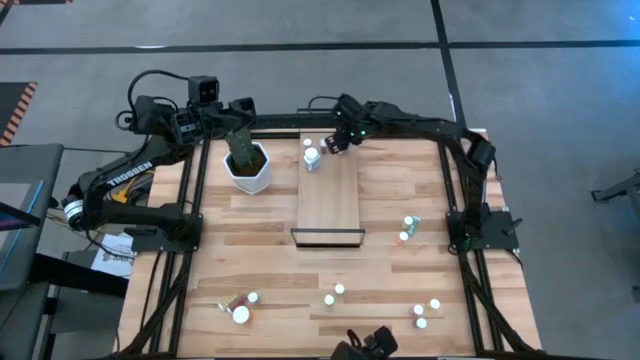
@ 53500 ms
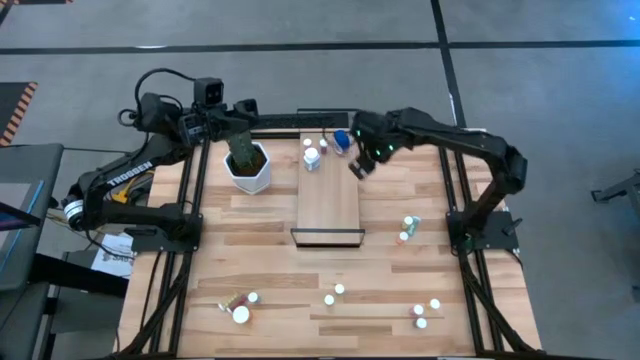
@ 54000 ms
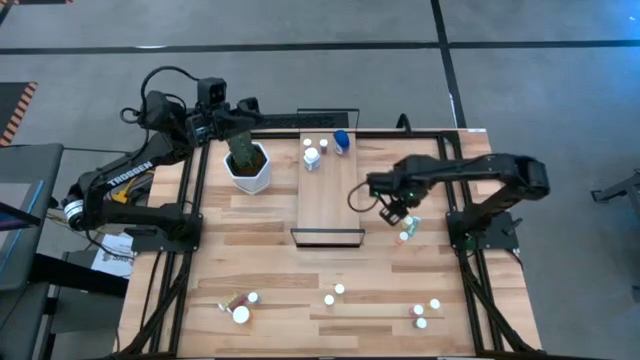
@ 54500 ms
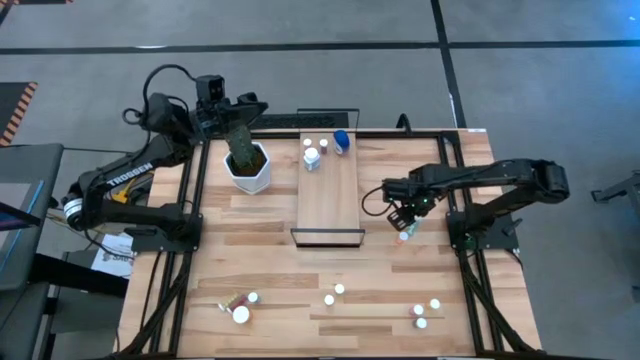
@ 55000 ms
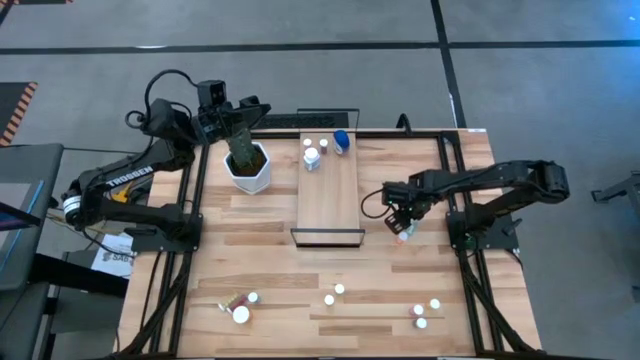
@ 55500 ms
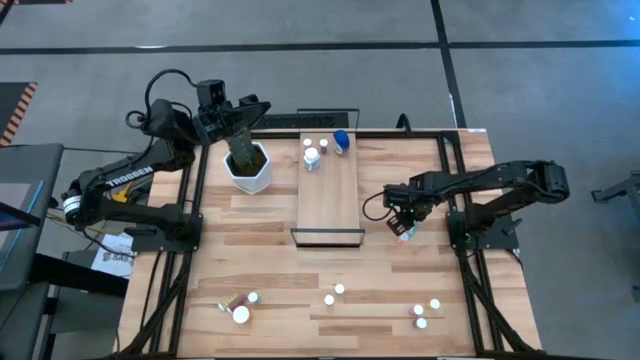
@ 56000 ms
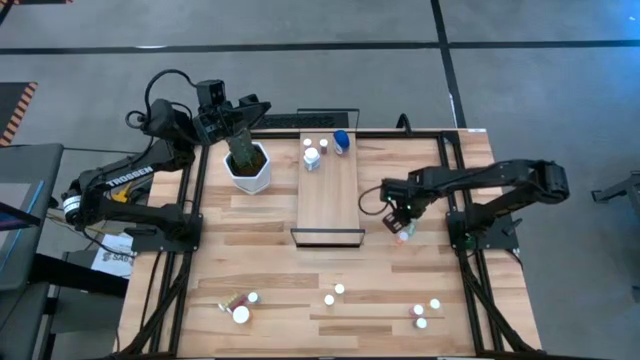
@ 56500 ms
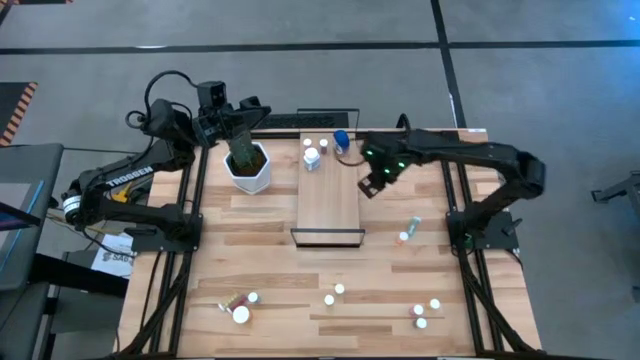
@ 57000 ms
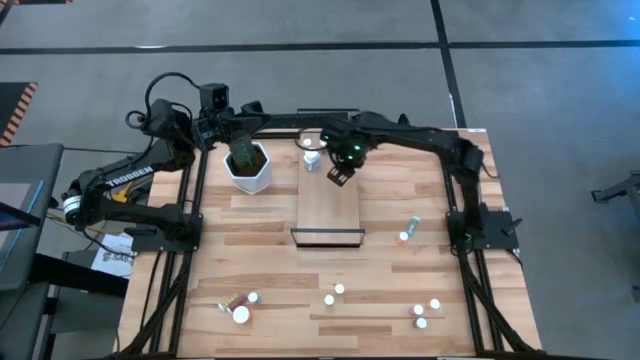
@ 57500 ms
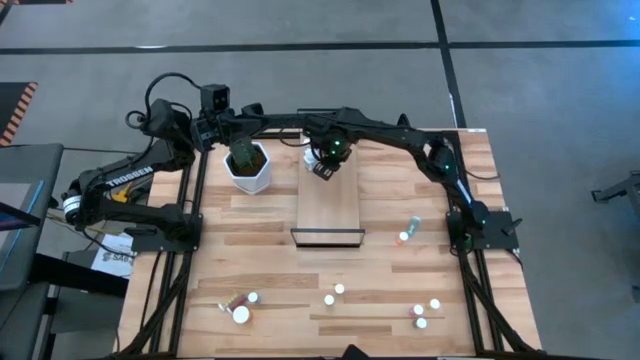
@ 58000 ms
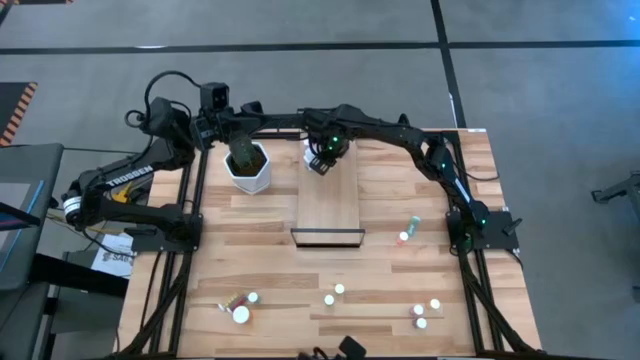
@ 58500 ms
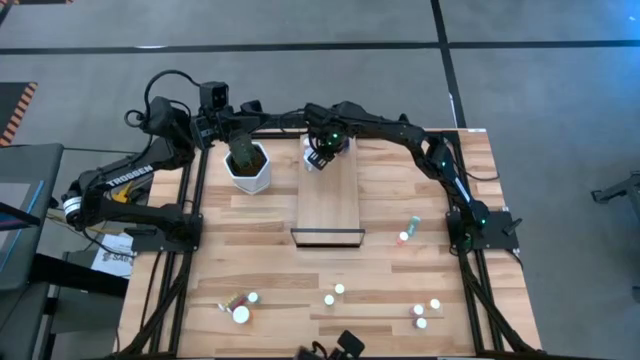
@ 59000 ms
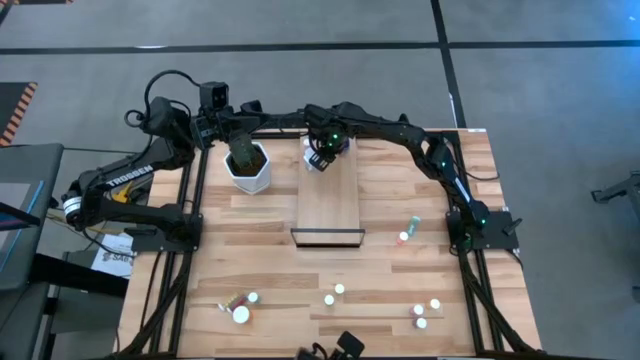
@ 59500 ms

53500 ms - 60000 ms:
Task: Pick and place medicine bottles onto shelf by color
Put the yellow pill bottle on the shelf

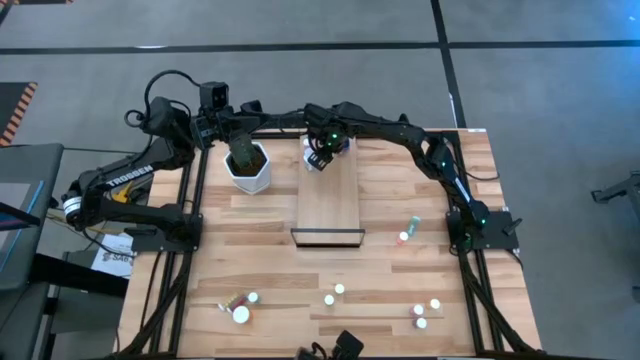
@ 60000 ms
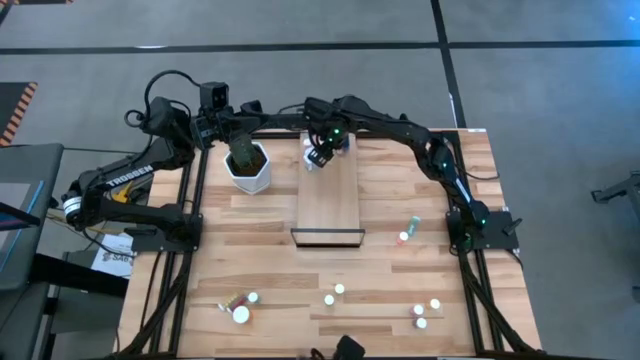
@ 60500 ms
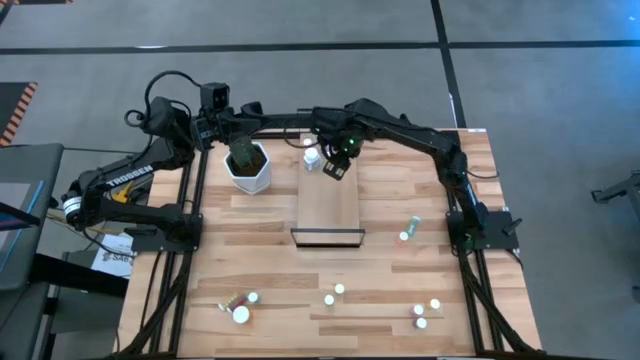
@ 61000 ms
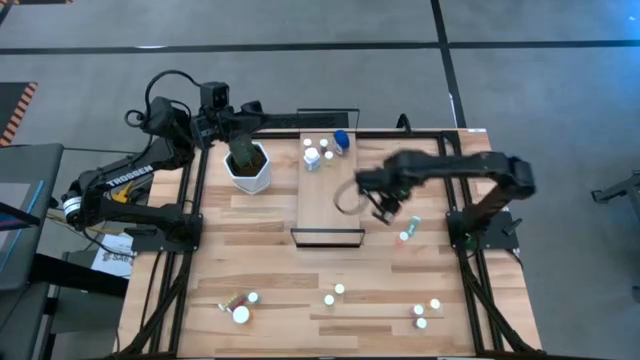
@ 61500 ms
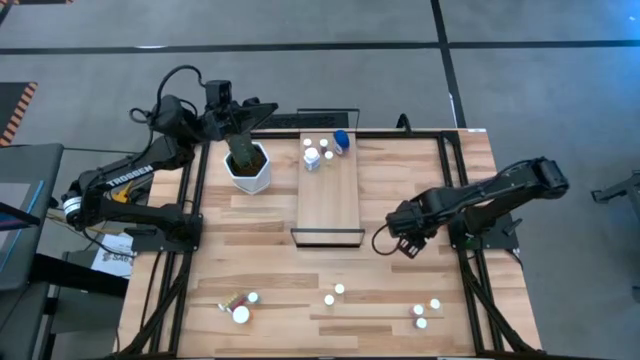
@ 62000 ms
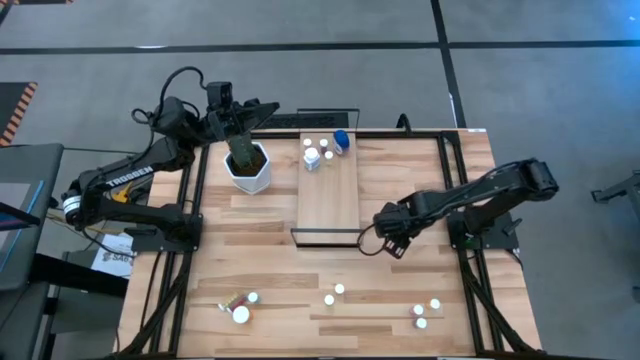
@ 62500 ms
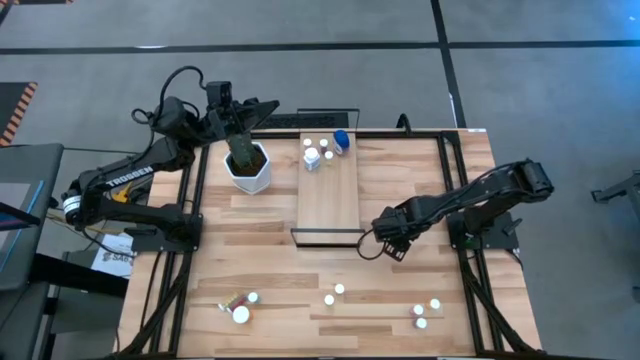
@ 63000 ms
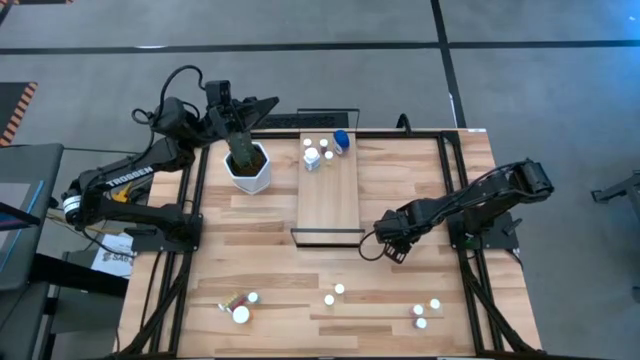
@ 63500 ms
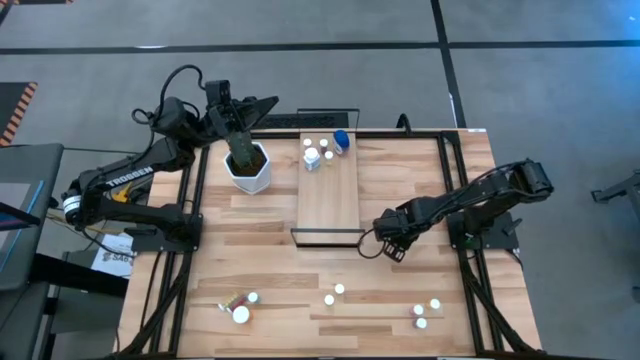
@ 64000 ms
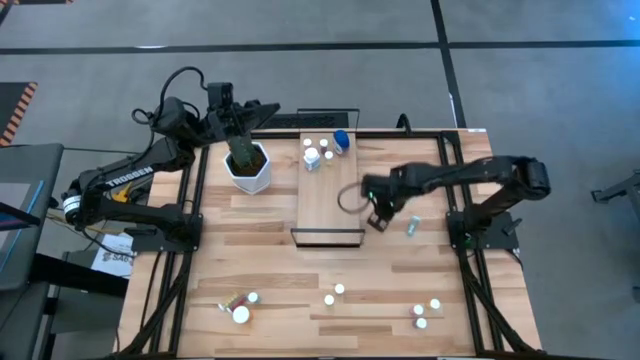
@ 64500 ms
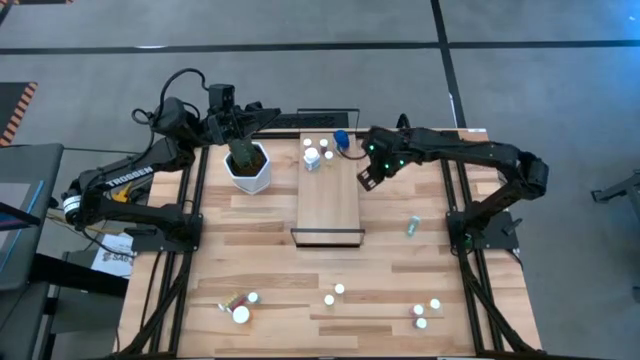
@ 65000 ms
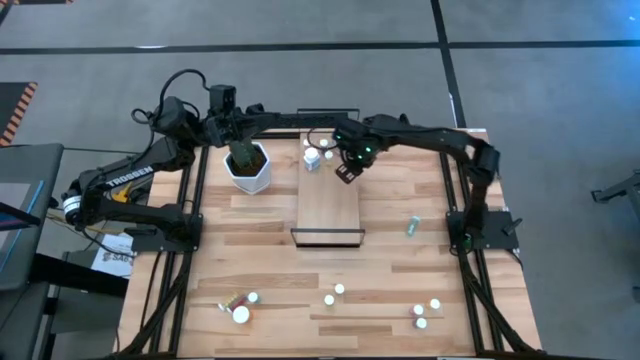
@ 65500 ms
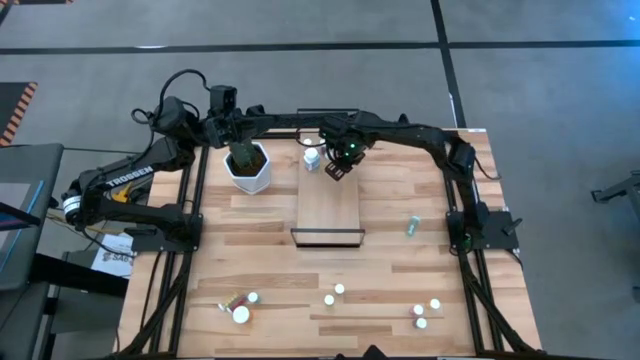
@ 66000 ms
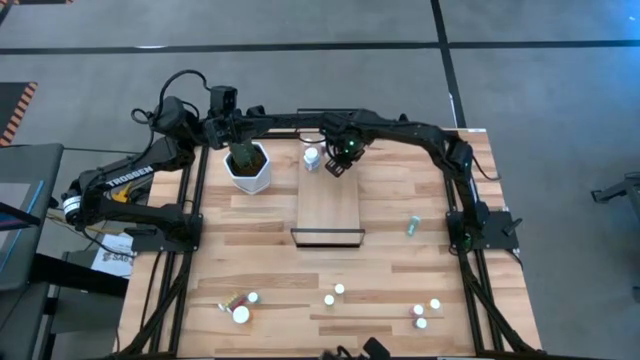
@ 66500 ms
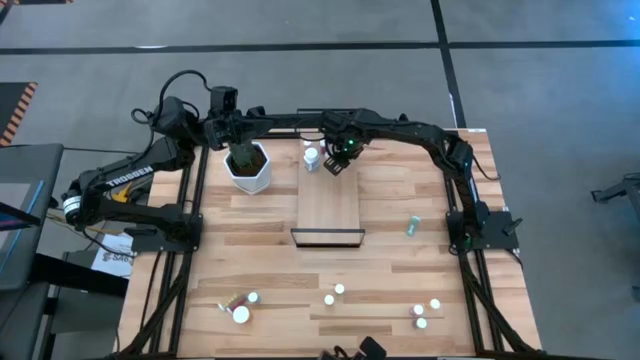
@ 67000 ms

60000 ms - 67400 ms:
Put the small orange pill bottle on the shelf

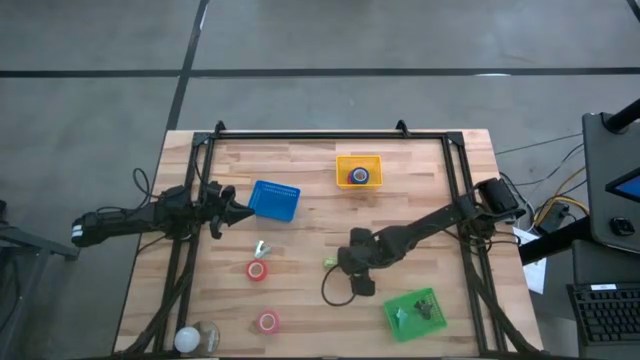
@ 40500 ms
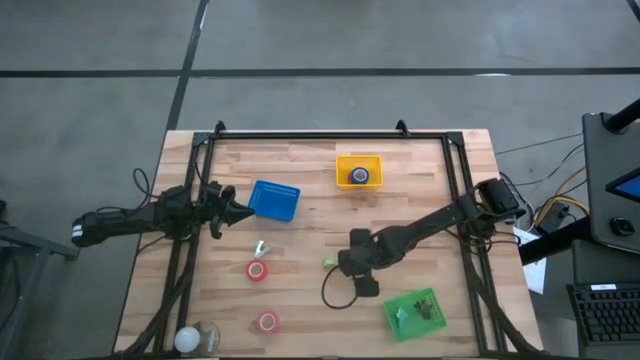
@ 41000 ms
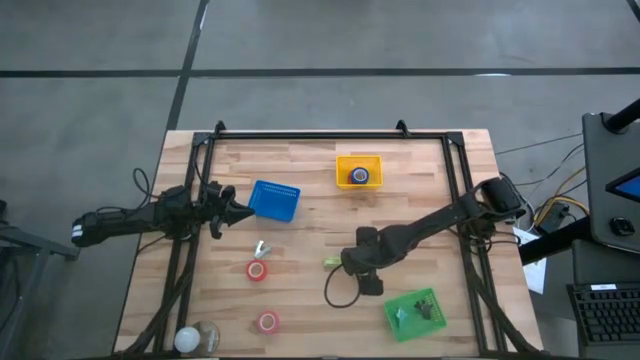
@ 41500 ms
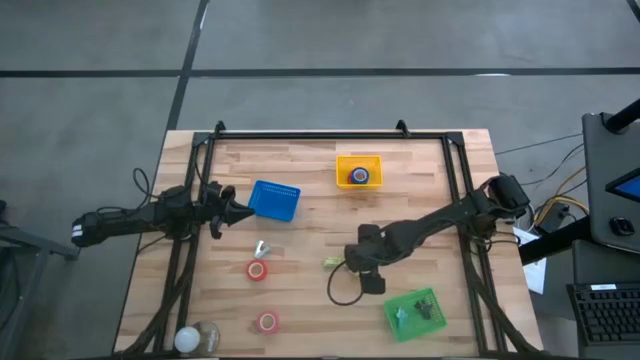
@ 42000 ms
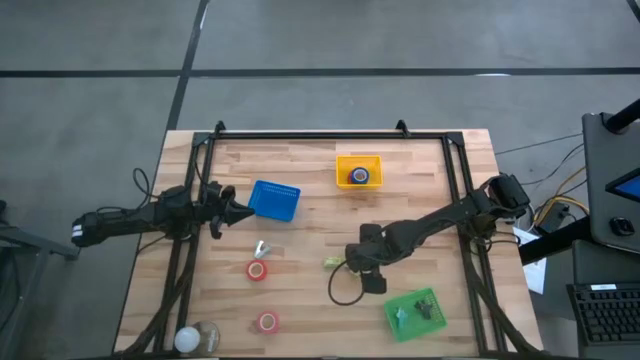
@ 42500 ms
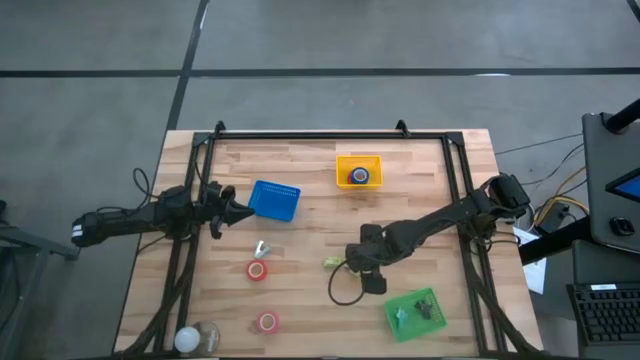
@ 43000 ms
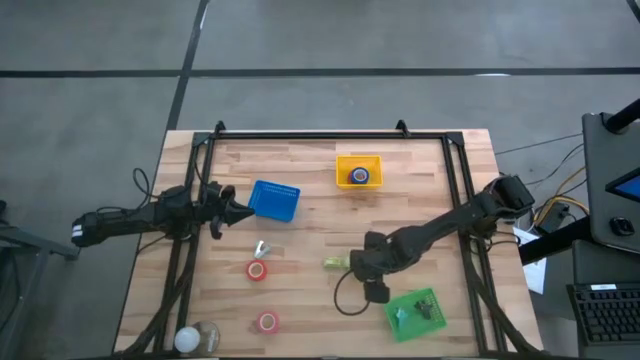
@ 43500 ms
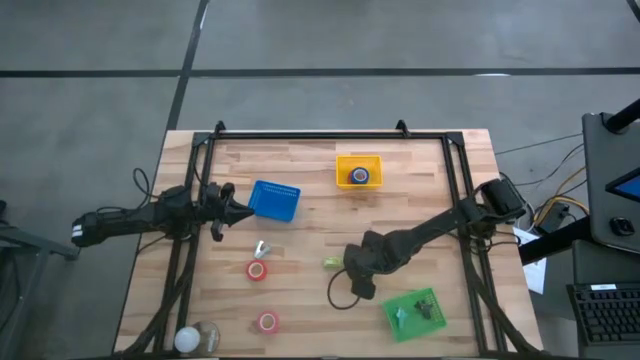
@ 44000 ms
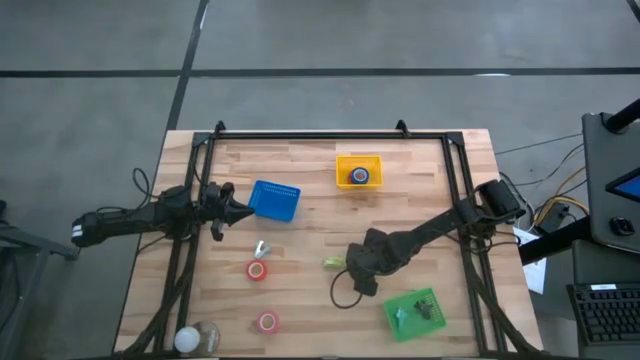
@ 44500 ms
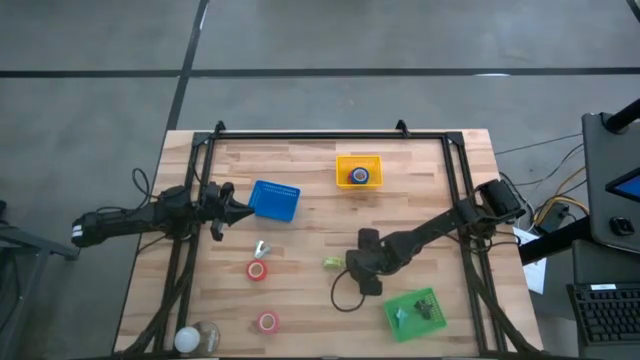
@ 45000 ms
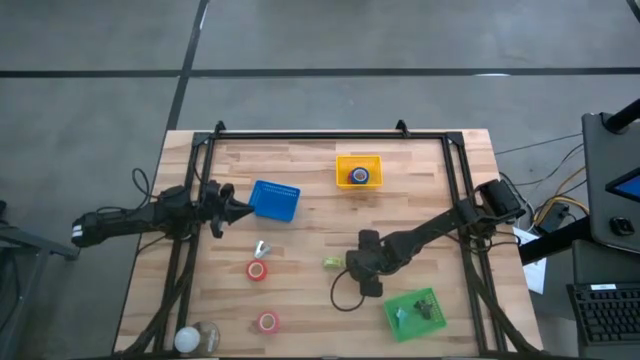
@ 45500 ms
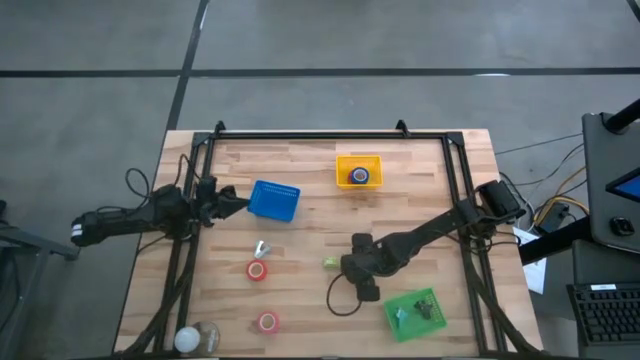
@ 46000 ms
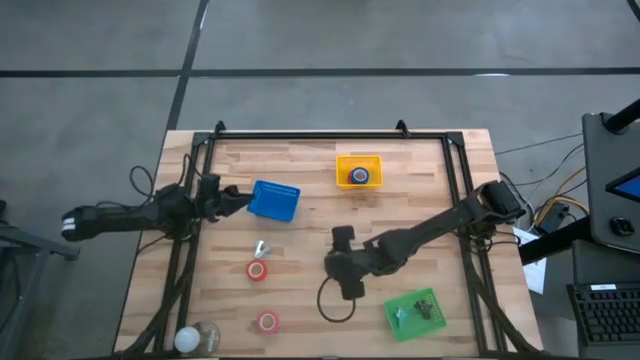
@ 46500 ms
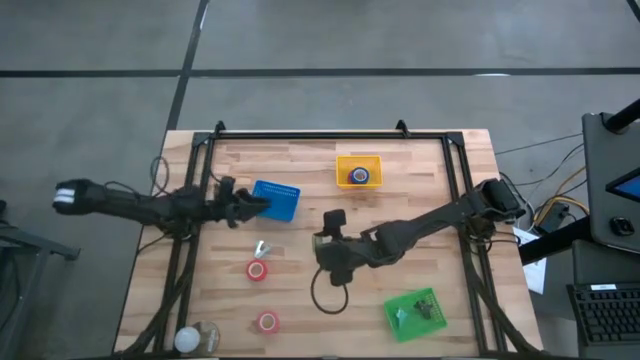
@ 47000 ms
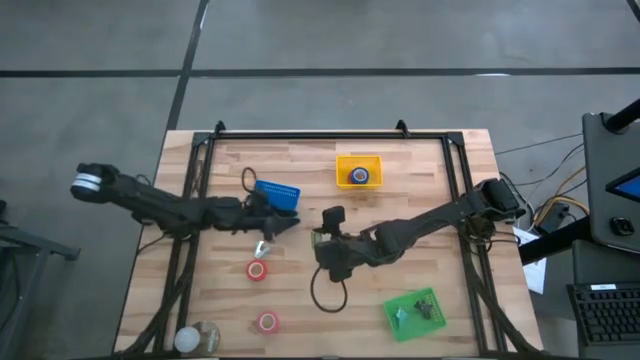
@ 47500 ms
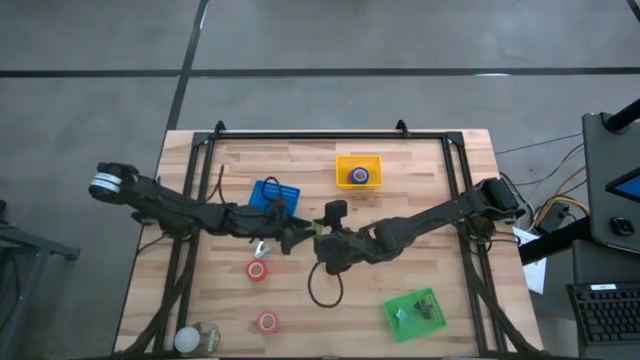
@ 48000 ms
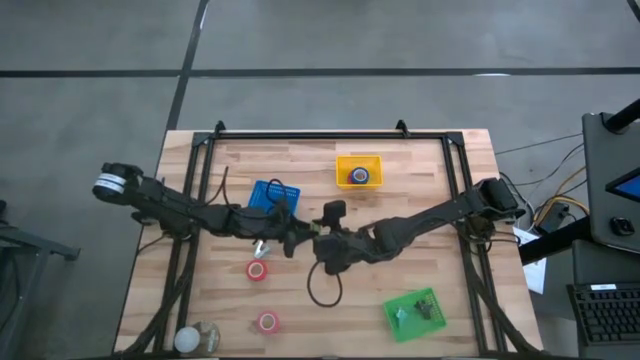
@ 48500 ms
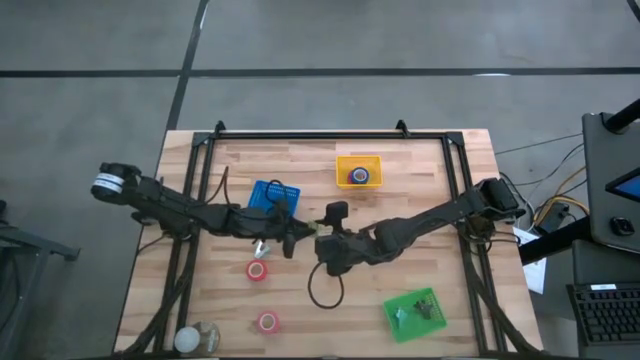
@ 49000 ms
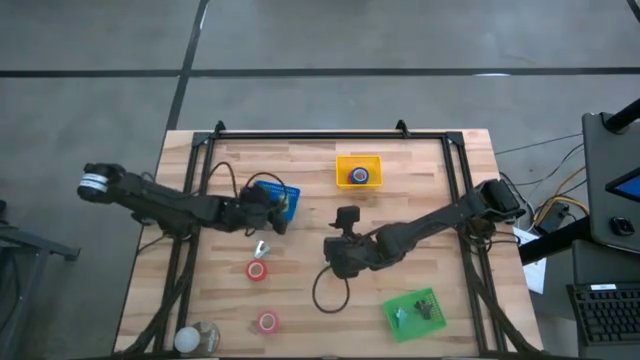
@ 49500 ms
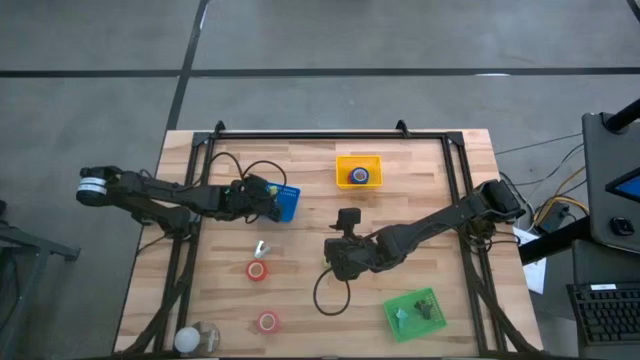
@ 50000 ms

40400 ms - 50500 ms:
Task: Pick and place Stapler, Stapler remover, tape
Put the right green stapler pin box into the blue bin
